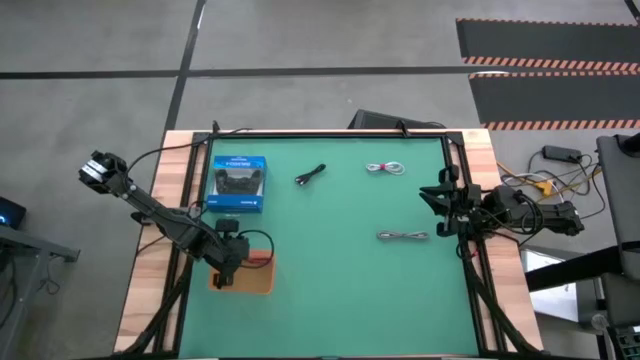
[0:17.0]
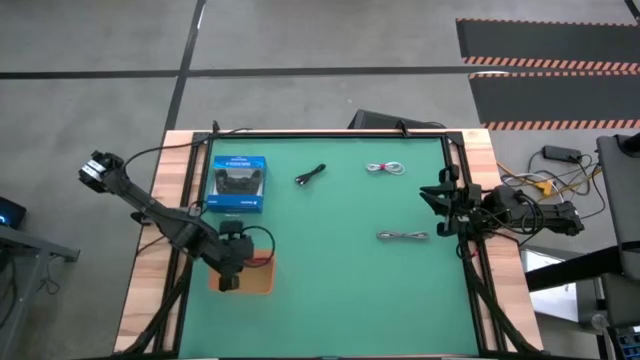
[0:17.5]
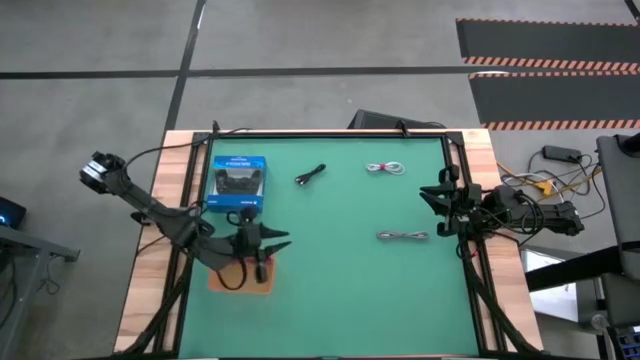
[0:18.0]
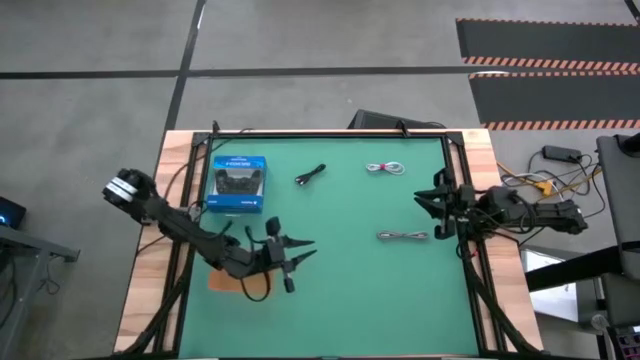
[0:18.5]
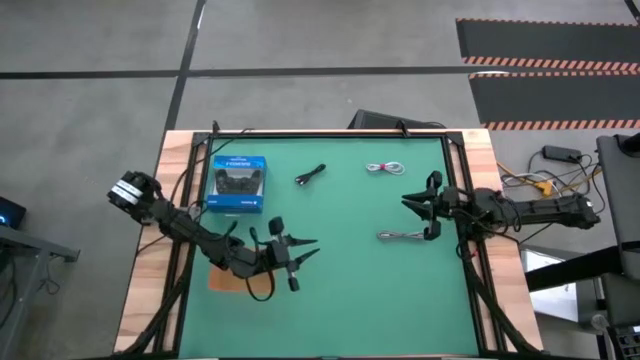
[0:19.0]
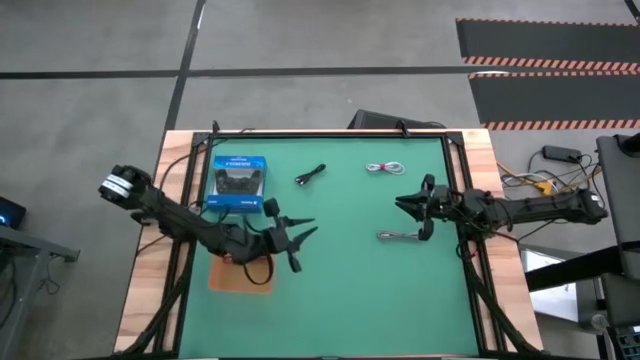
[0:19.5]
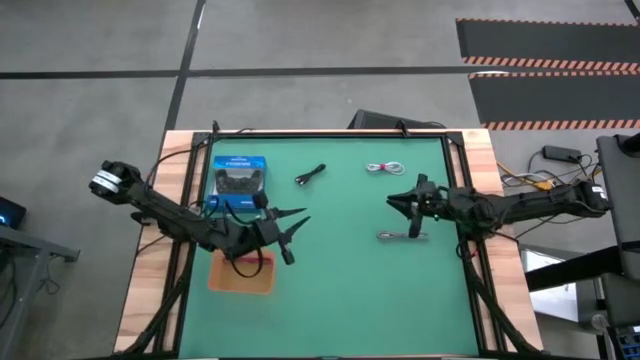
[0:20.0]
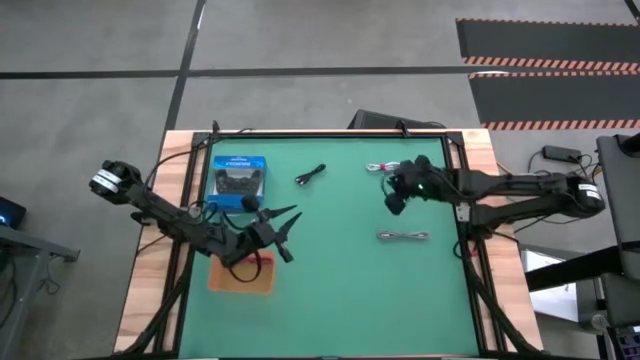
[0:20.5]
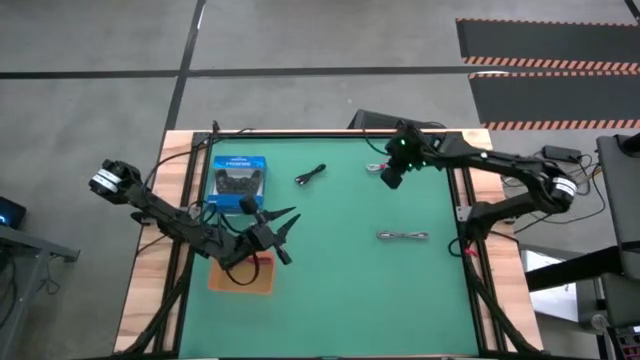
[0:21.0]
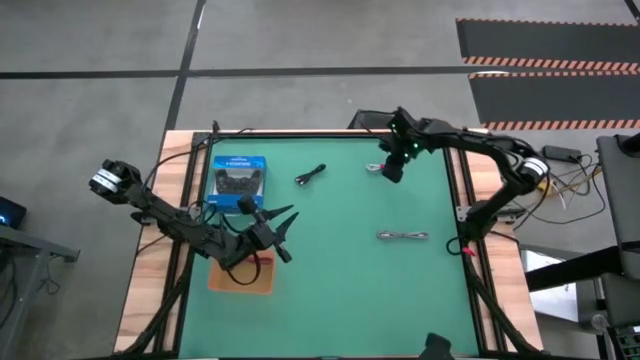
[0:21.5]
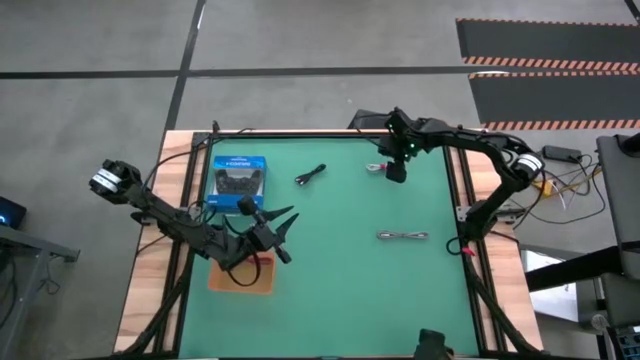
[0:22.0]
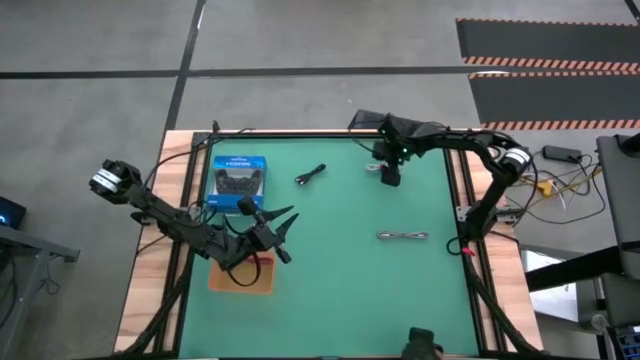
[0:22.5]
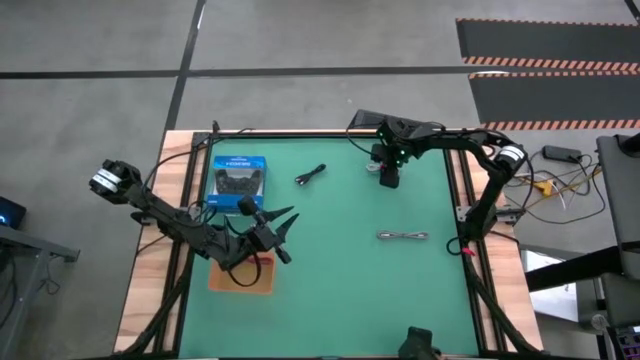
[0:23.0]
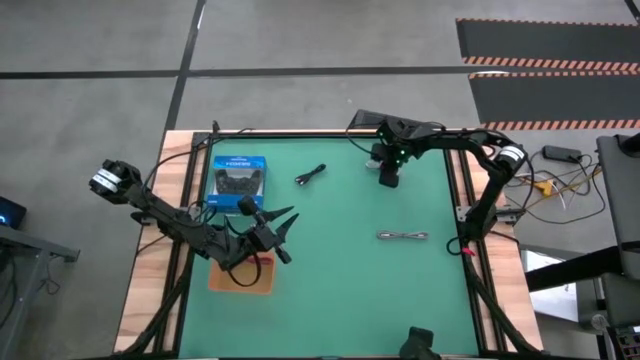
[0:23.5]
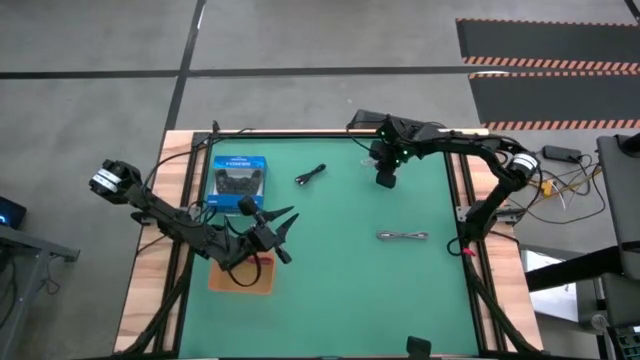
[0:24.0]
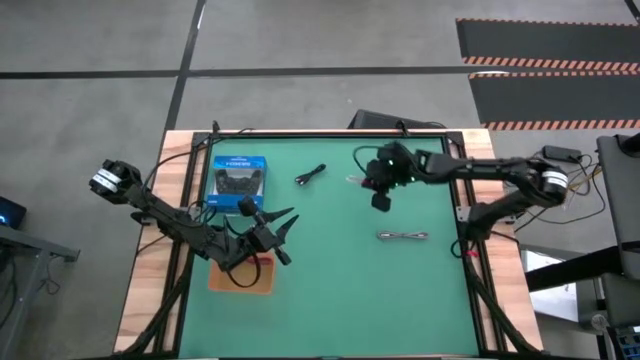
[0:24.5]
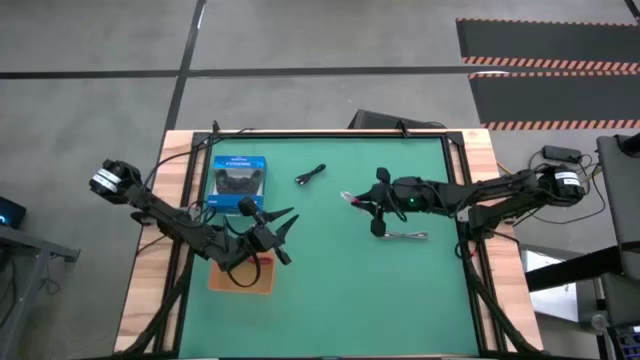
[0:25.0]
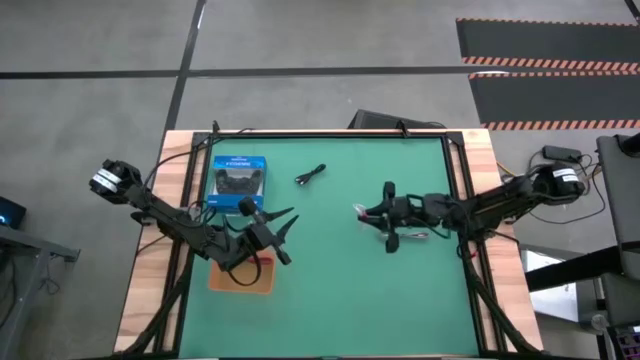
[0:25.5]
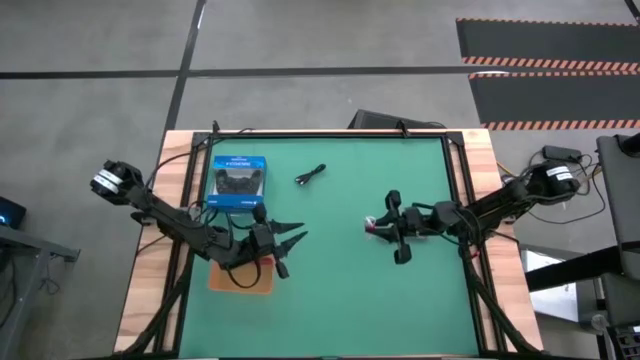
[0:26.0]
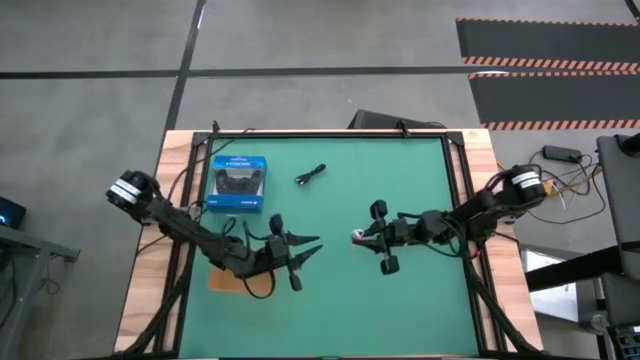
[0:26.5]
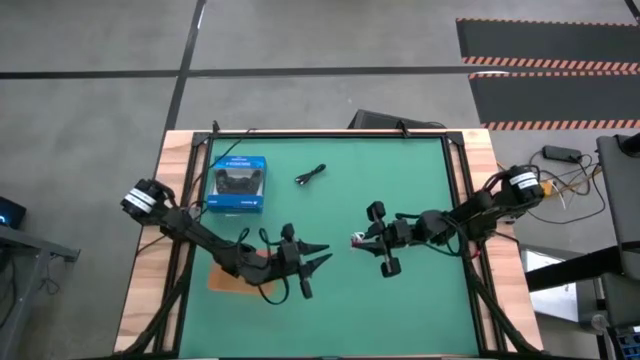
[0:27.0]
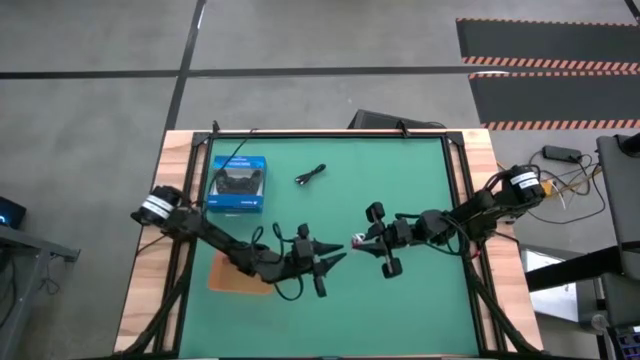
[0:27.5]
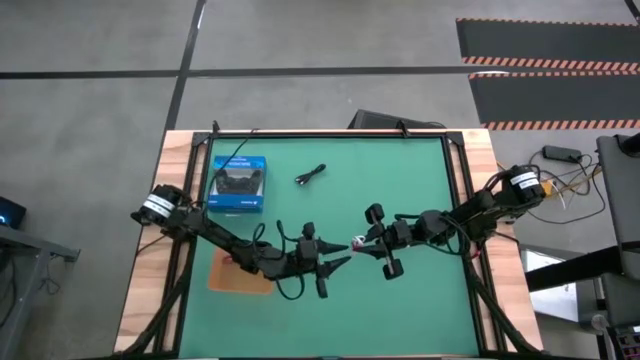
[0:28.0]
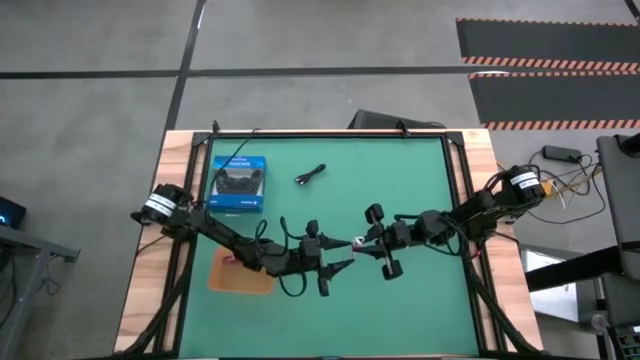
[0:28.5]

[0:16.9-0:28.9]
Task: Pick and place USB-C Cables
Put the white charger cable into the orange bin

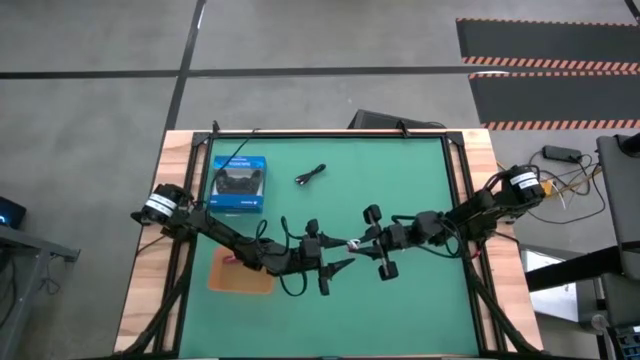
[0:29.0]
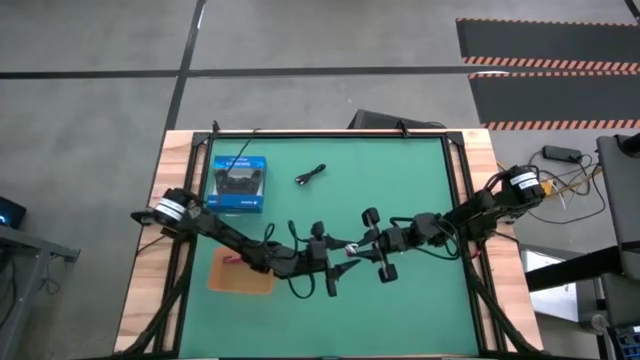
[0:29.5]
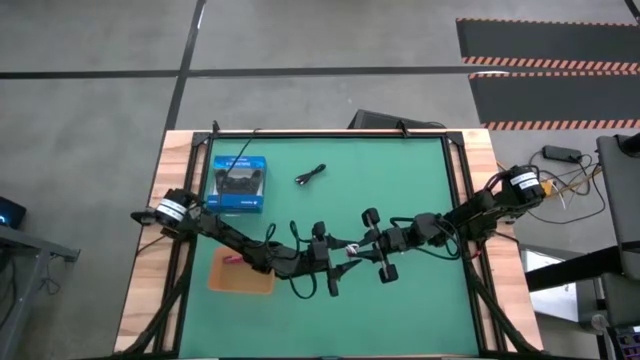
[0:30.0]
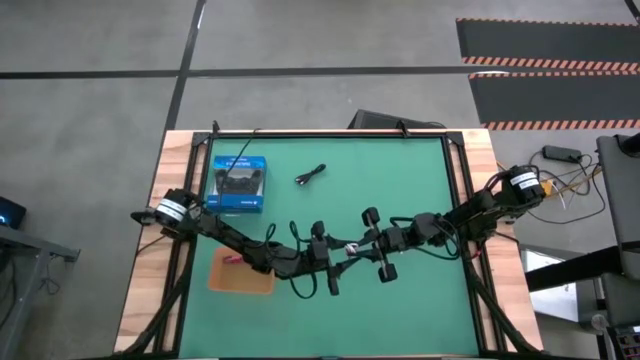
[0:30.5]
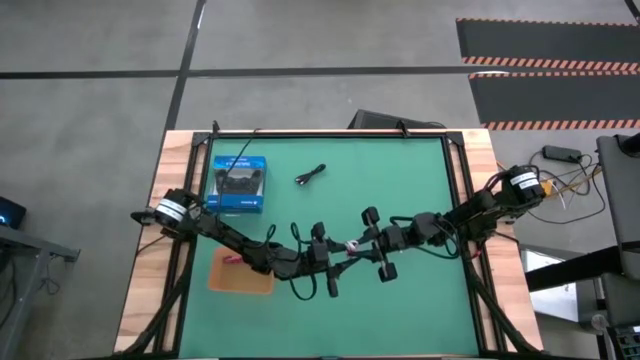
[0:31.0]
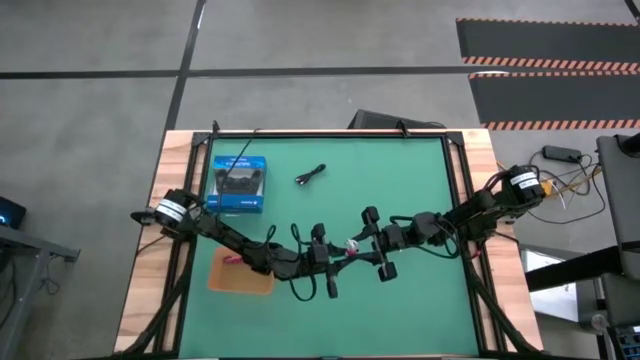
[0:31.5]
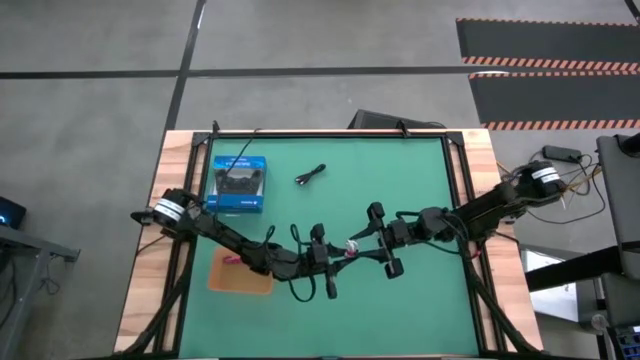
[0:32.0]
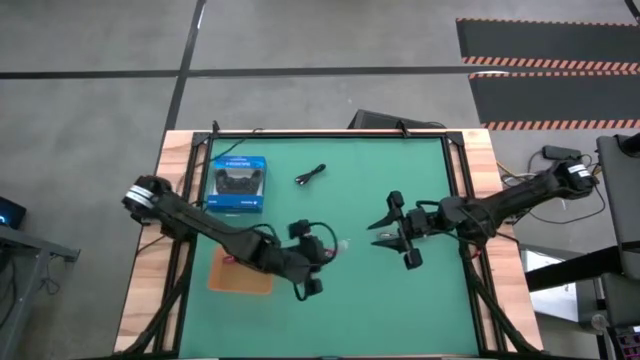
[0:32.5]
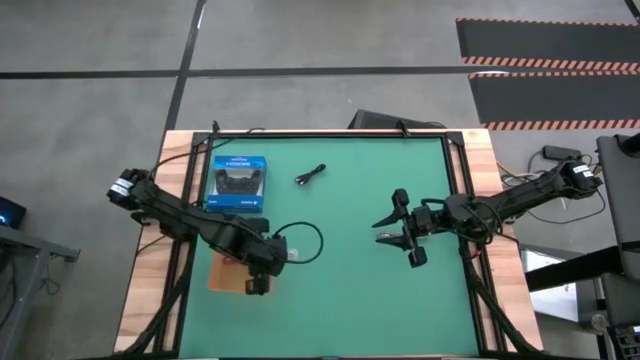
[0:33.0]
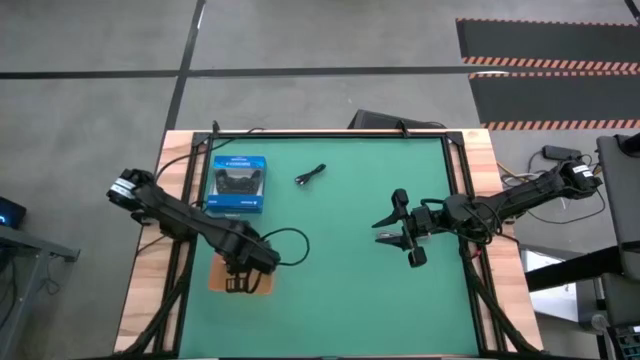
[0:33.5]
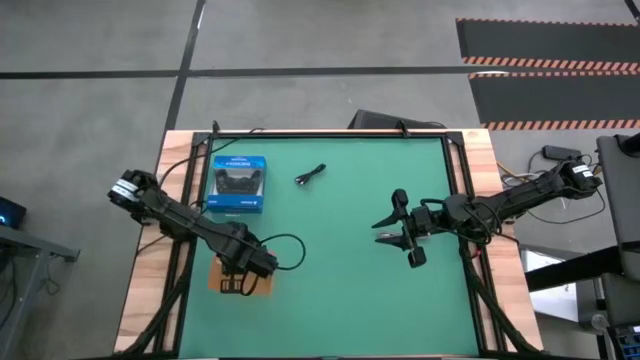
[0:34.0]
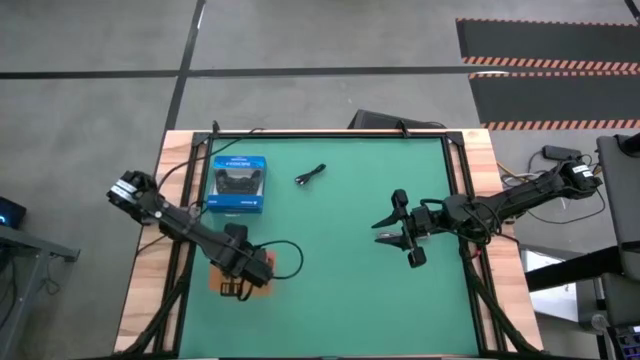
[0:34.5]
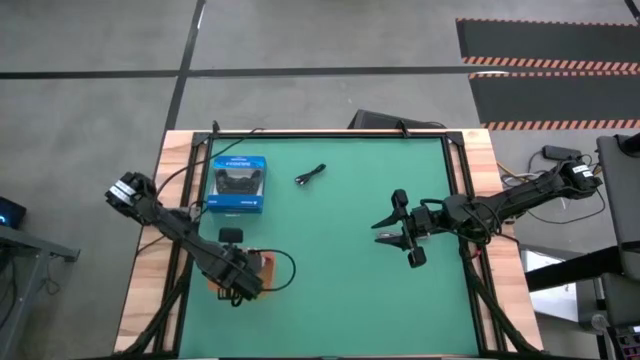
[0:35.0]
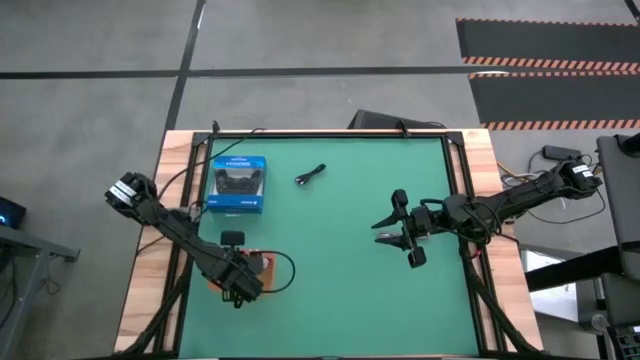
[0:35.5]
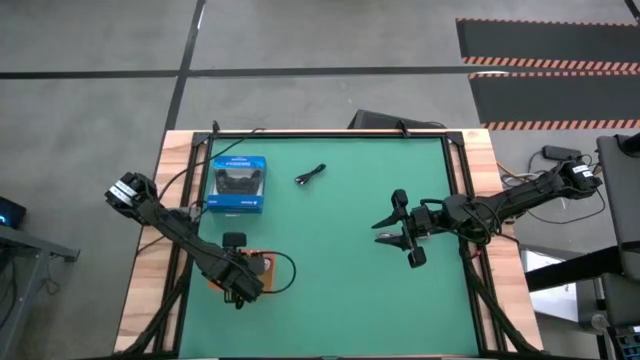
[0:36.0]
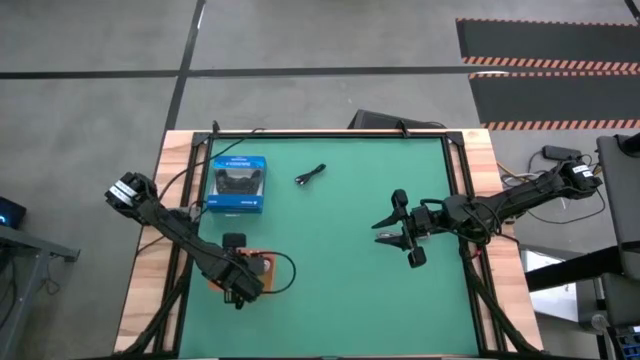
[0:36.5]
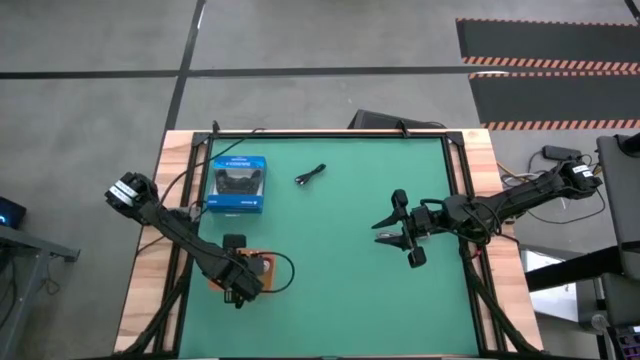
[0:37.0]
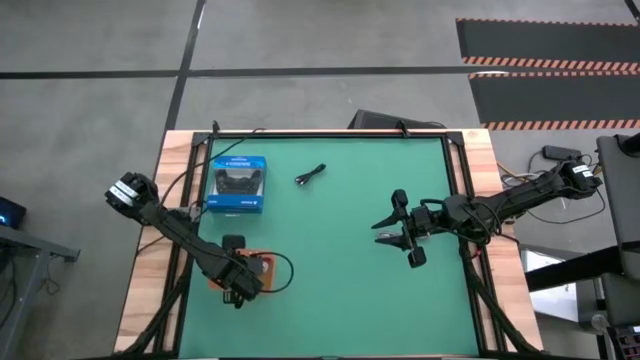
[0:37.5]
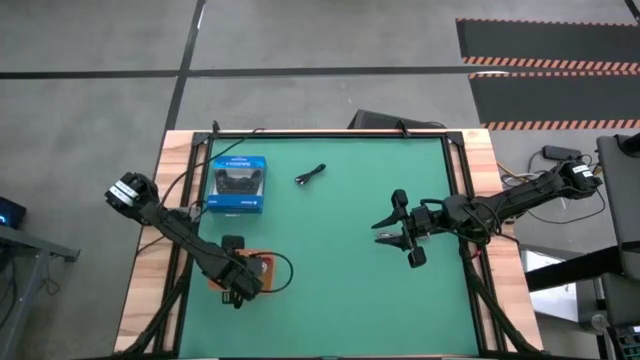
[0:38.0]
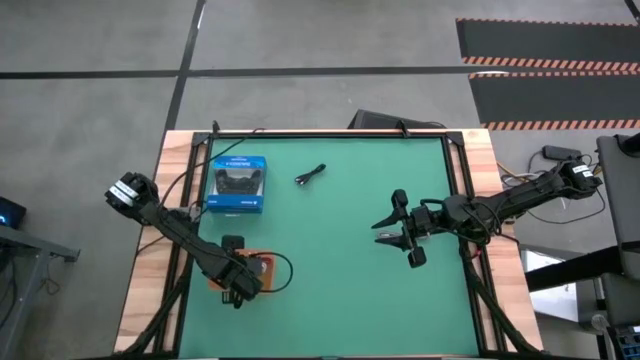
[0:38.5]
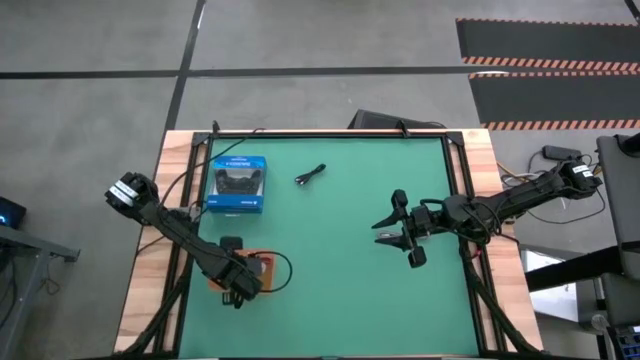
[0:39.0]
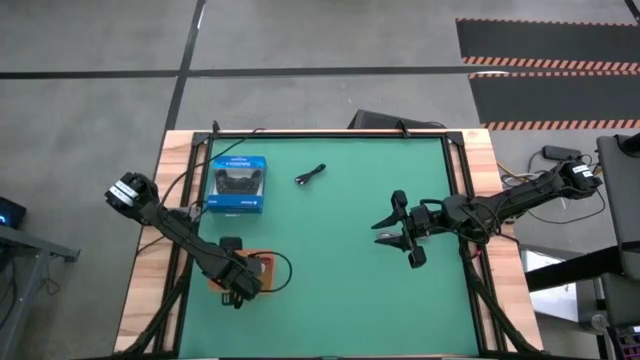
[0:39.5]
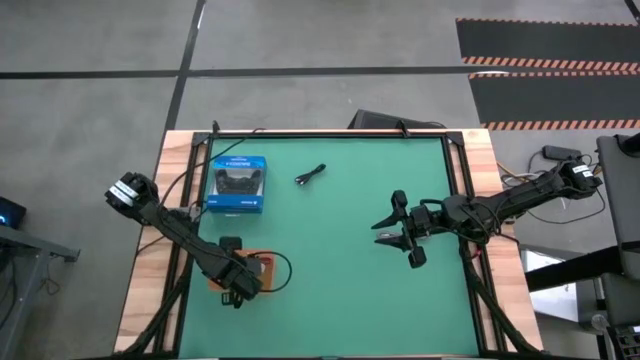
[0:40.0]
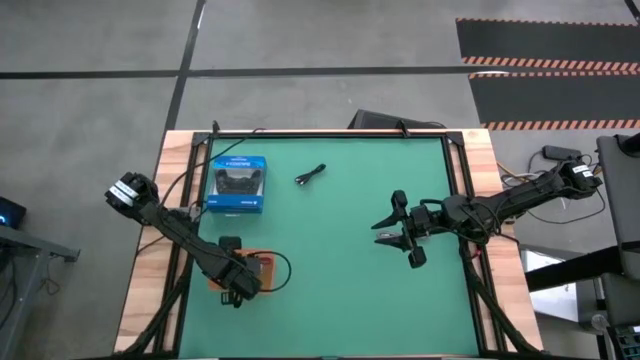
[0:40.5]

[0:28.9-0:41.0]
Put the white charger cable into the orange bin
